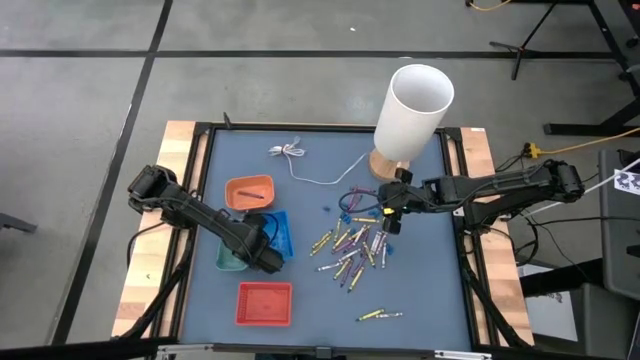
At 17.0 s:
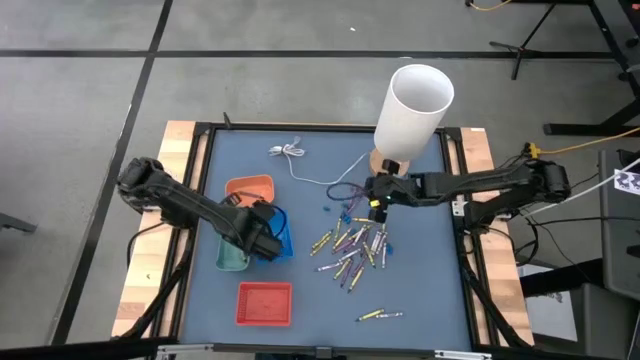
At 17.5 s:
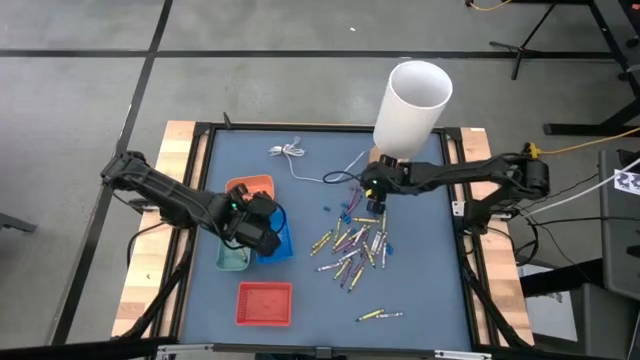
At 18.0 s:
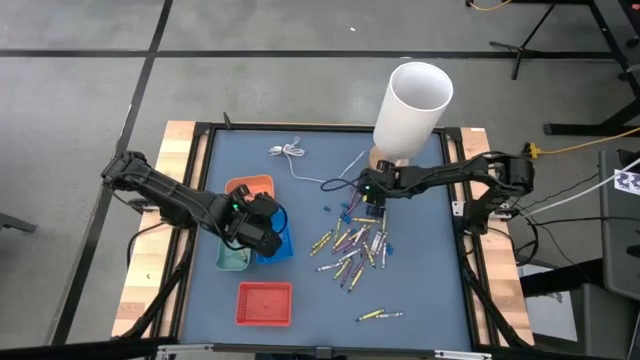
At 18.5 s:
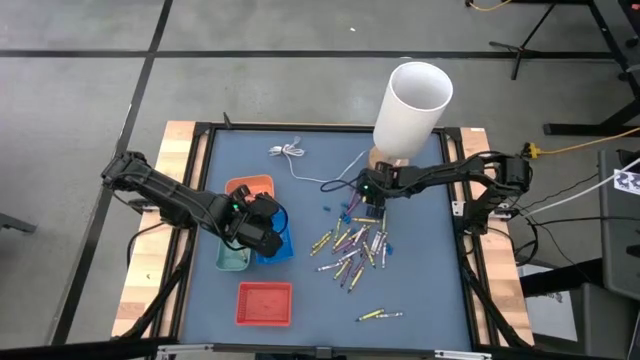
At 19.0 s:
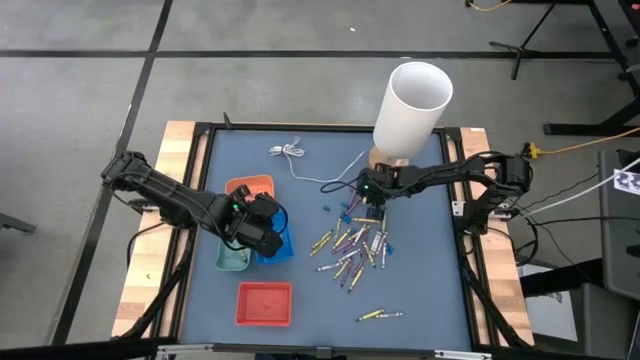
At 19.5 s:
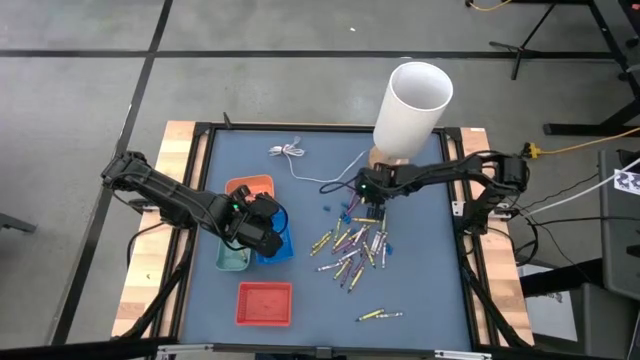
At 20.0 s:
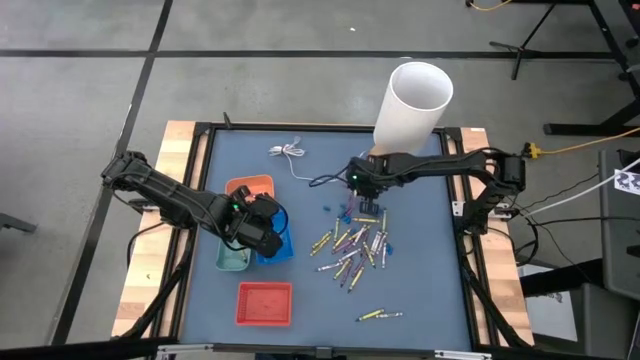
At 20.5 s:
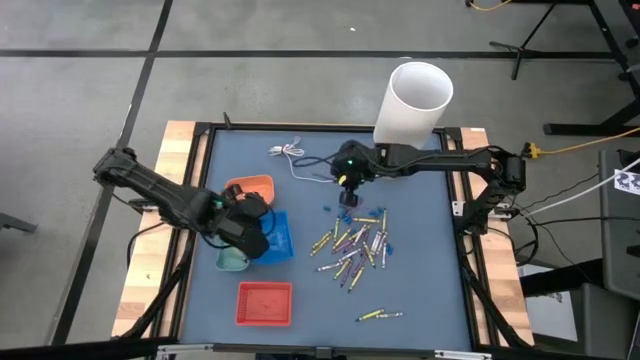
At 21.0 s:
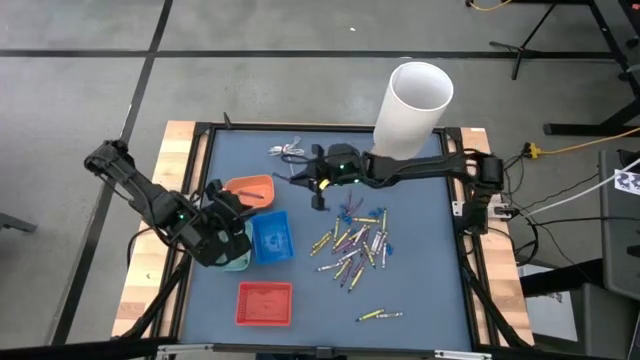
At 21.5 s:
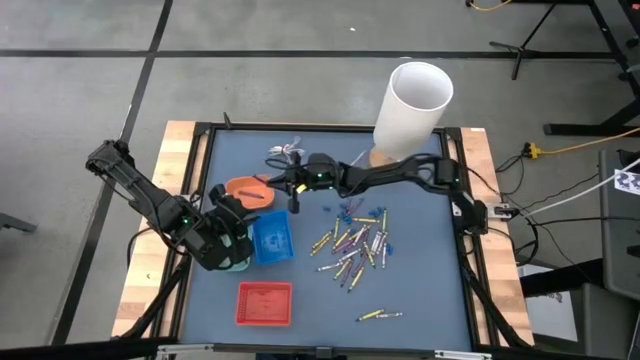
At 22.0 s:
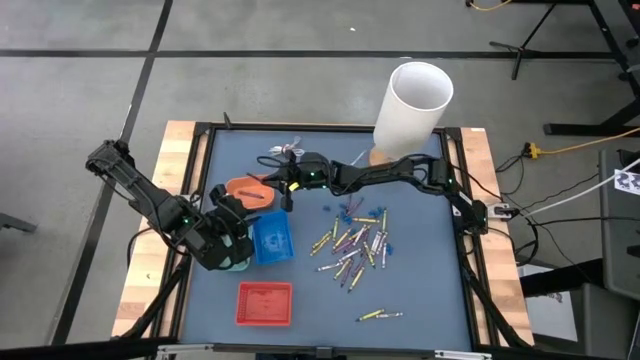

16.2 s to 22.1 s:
Task: Sort crayons
Put the violet crayon into the orange bin

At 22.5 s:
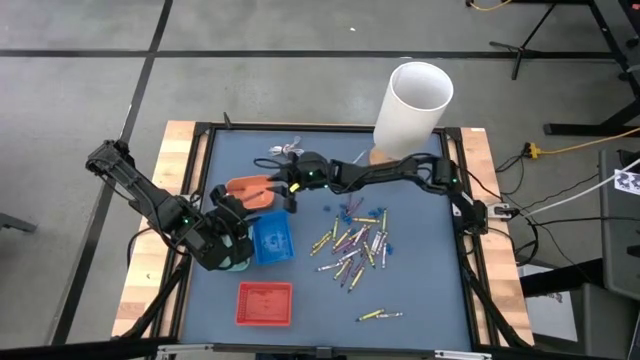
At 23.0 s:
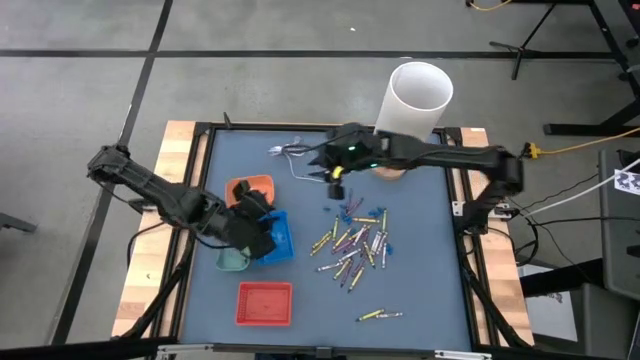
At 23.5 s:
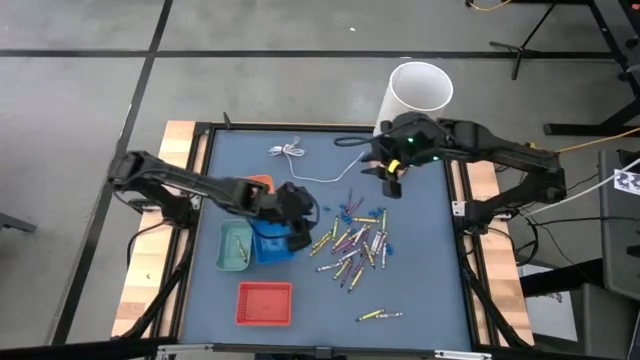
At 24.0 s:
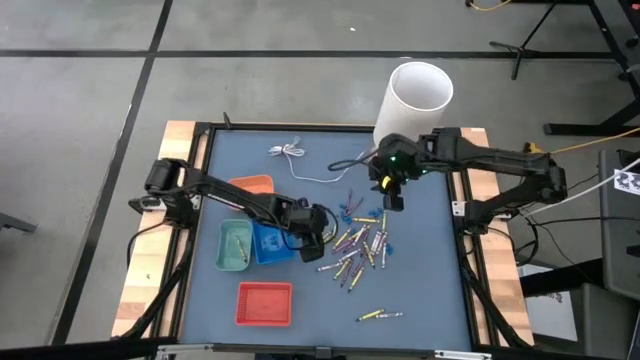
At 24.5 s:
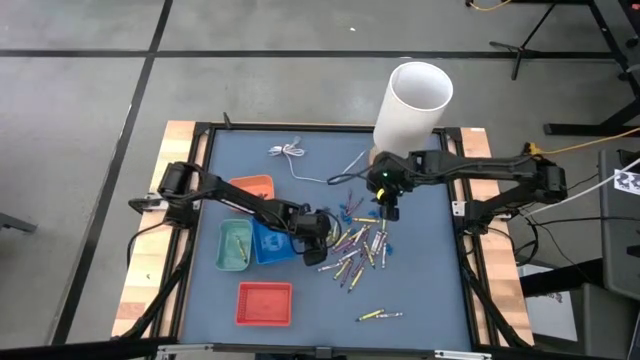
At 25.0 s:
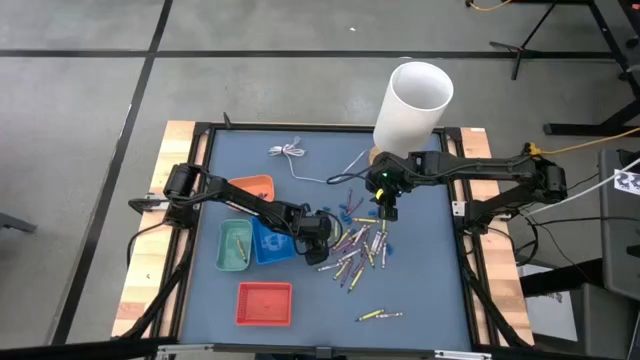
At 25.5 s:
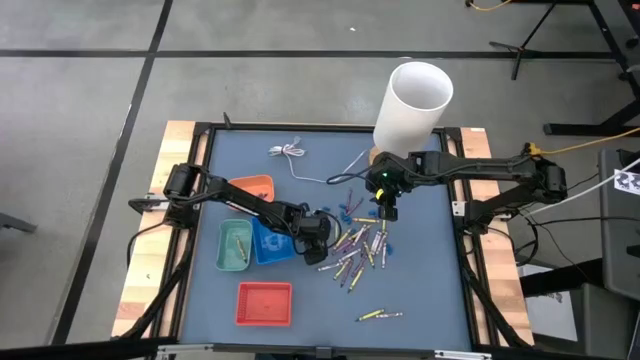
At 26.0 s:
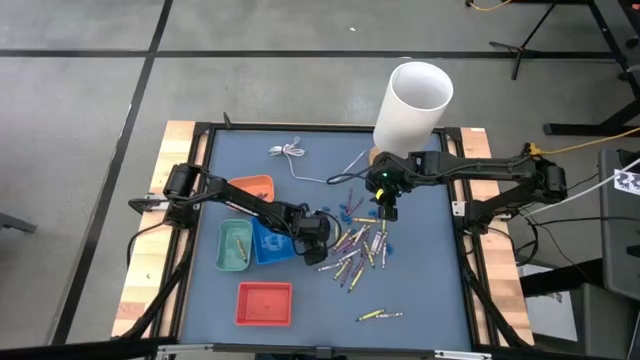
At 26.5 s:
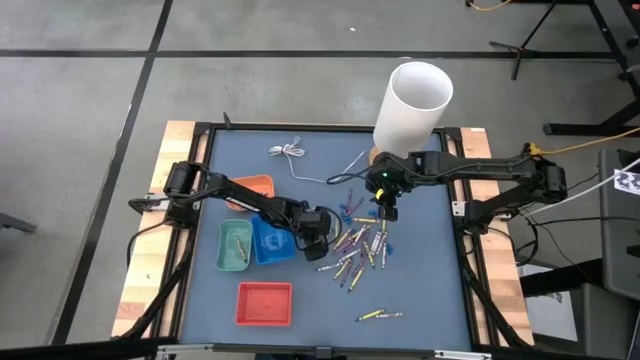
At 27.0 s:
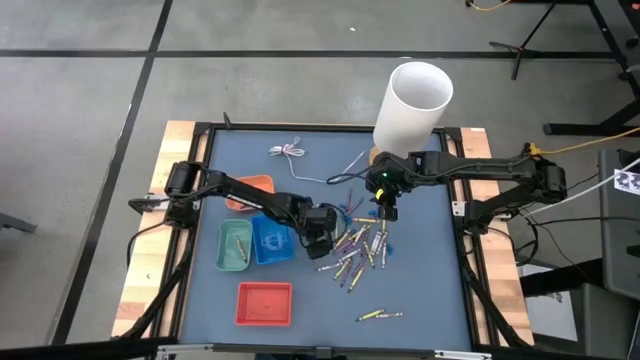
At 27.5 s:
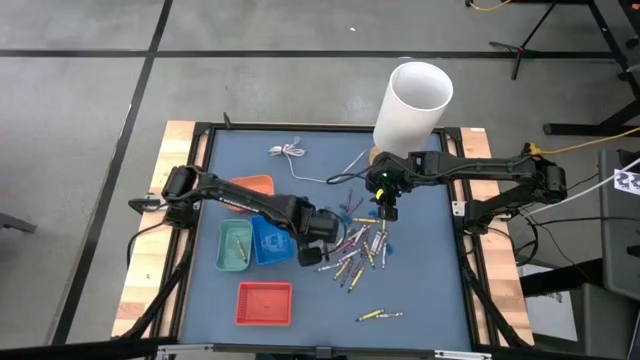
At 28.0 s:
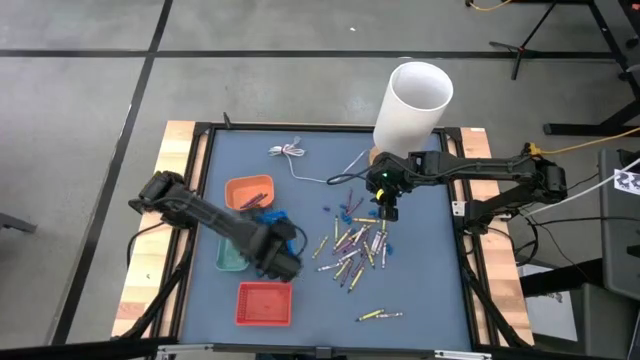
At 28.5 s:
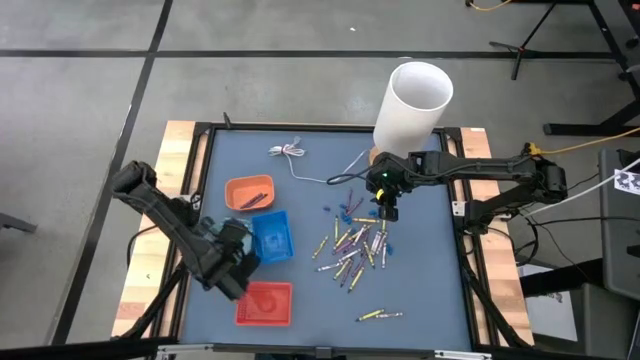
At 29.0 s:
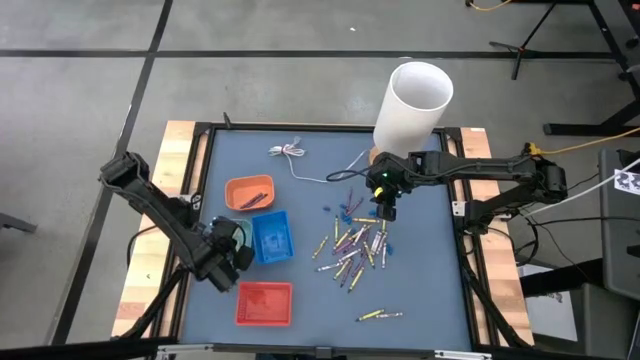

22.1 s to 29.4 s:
Put the green crayon into the blue green bin

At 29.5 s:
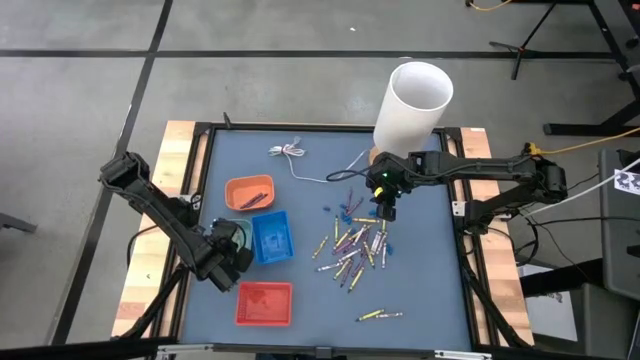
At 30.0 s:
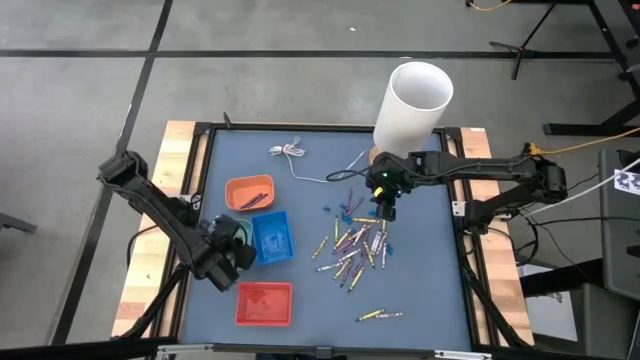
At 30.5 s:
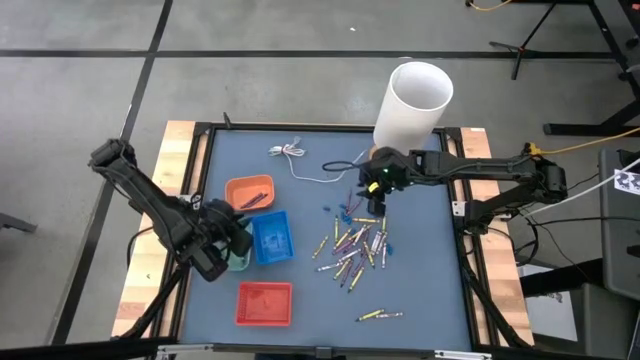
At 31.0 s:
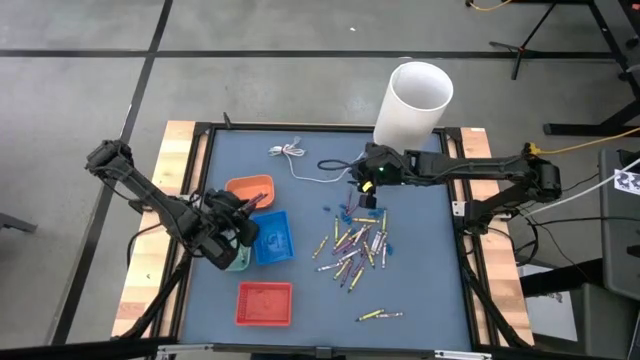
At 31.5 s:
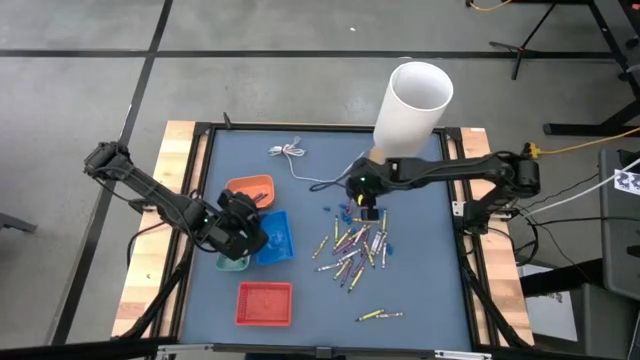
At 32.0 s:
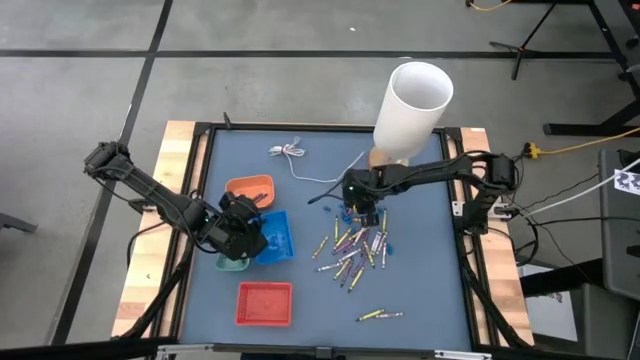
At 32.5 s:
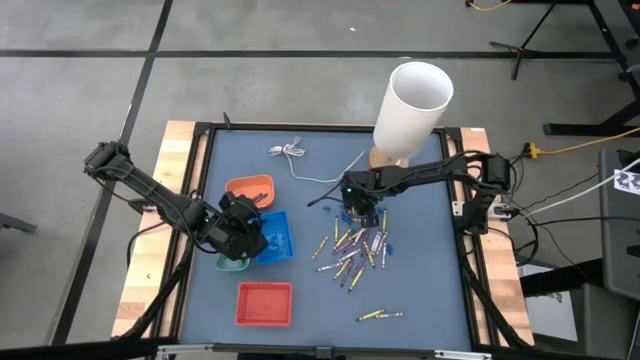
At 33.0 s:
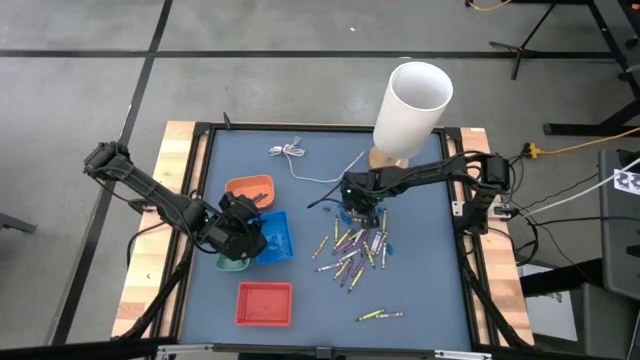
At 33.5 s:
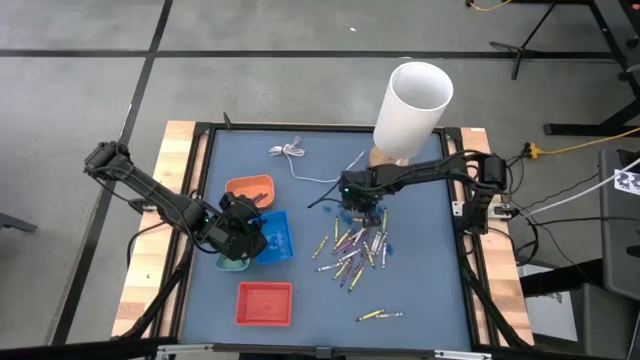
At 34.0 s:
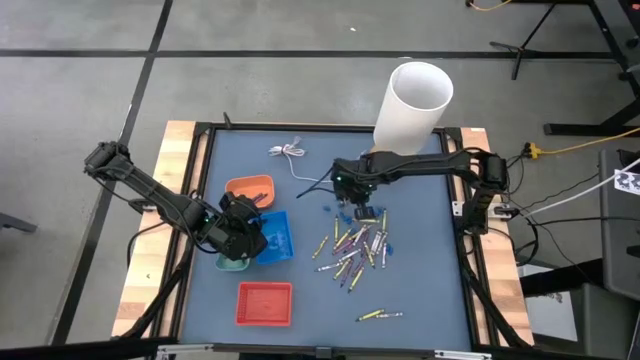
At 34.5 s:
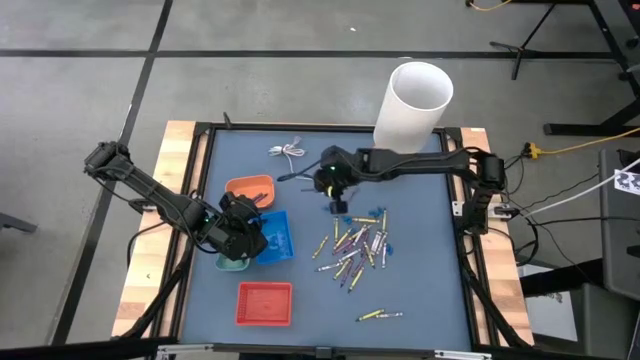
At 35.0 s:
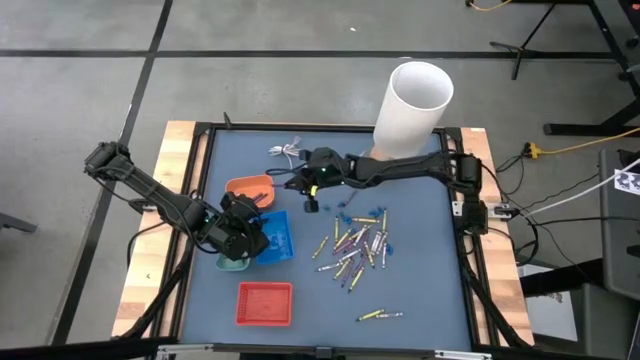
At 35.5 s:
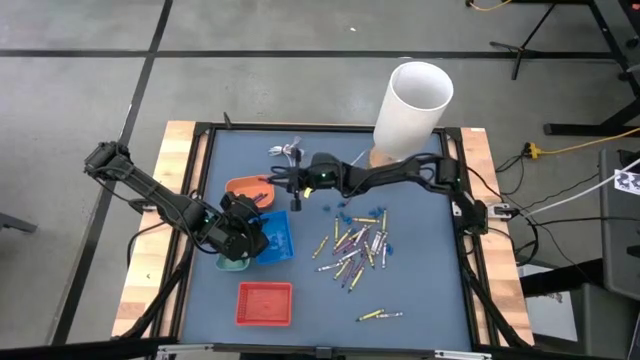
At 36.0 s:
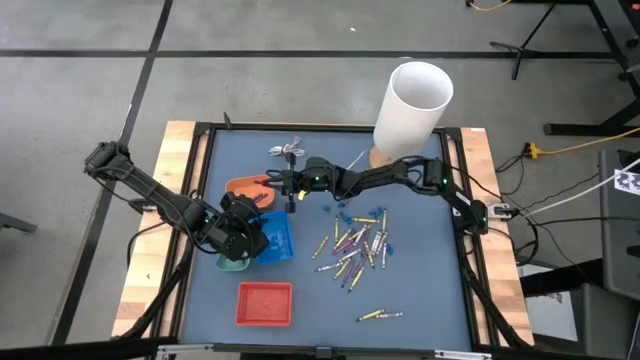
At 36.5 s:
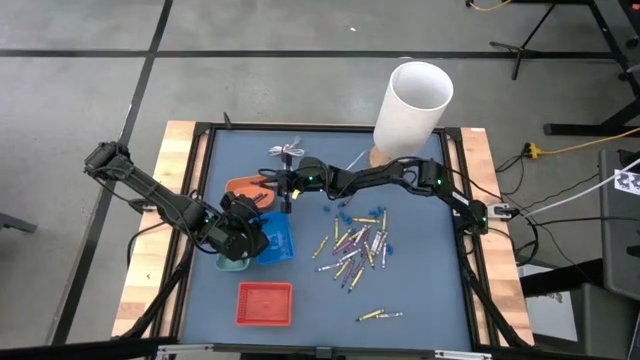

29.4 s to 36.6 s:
Put the violet crayon into the orange bin
